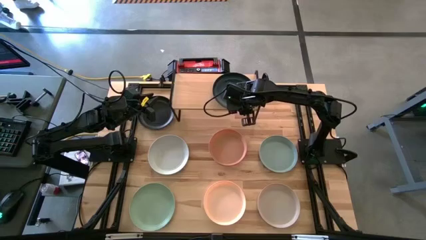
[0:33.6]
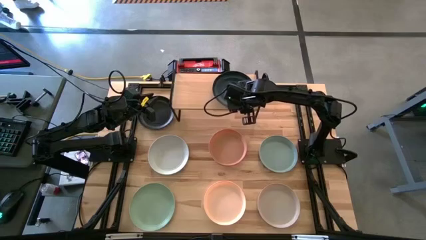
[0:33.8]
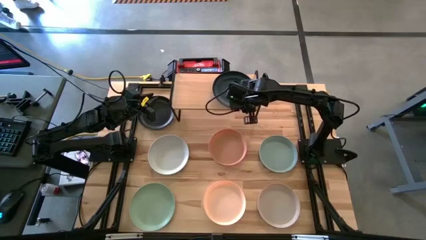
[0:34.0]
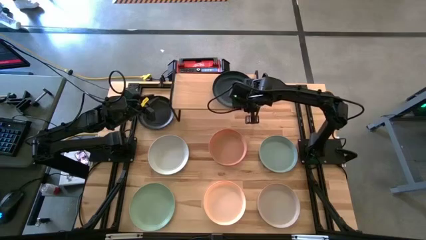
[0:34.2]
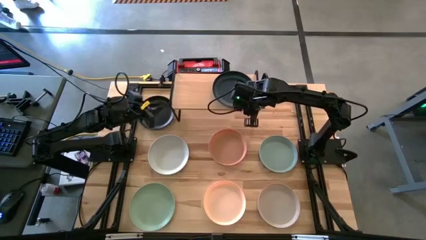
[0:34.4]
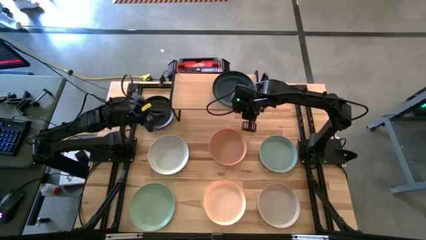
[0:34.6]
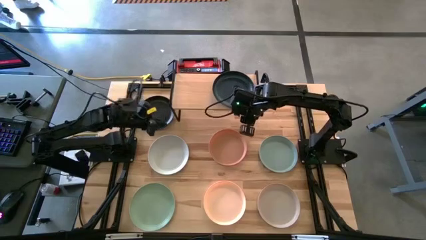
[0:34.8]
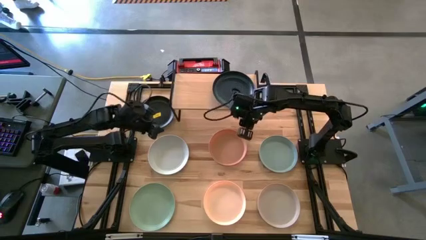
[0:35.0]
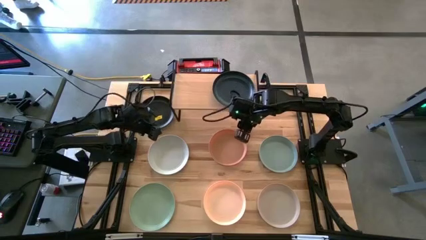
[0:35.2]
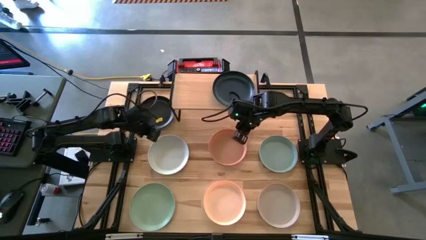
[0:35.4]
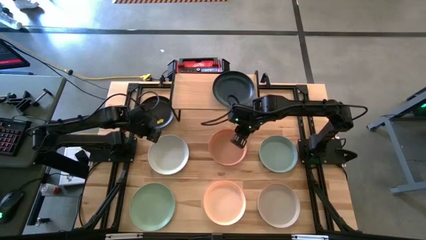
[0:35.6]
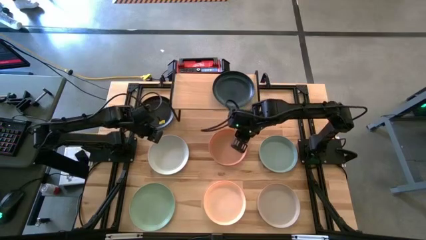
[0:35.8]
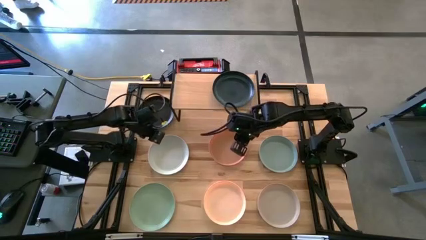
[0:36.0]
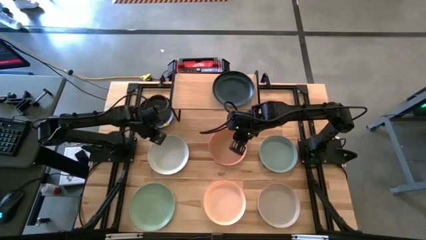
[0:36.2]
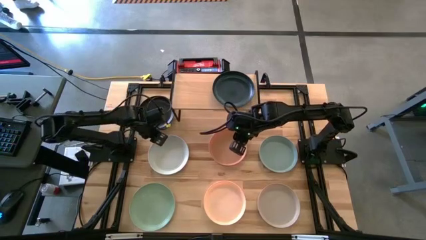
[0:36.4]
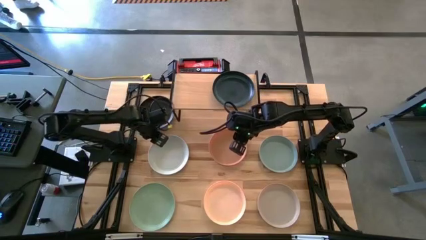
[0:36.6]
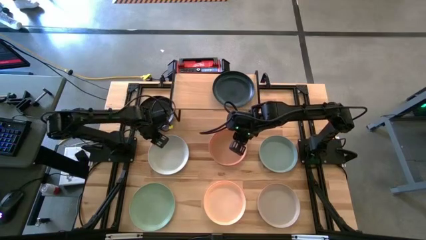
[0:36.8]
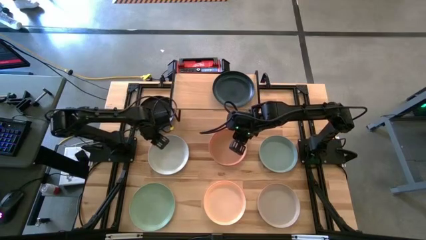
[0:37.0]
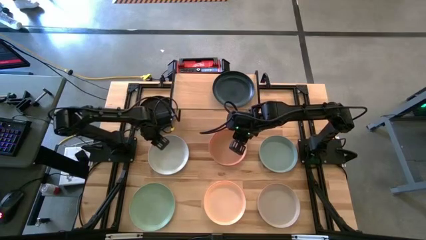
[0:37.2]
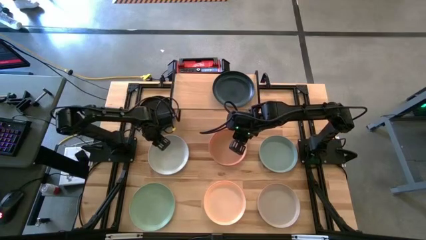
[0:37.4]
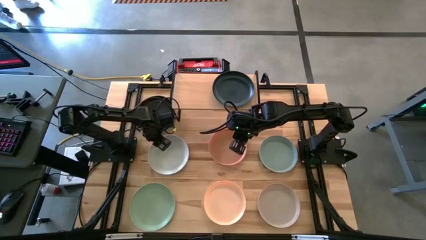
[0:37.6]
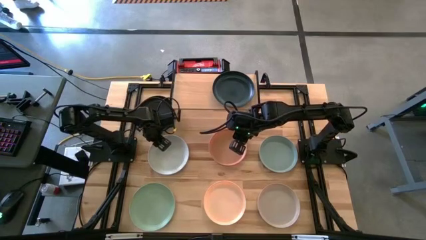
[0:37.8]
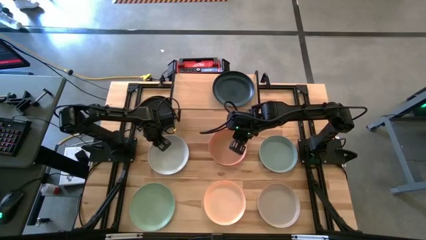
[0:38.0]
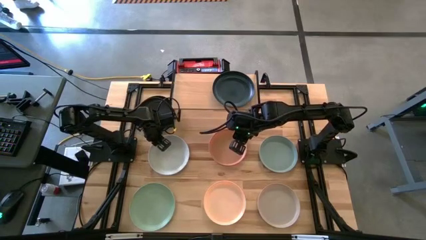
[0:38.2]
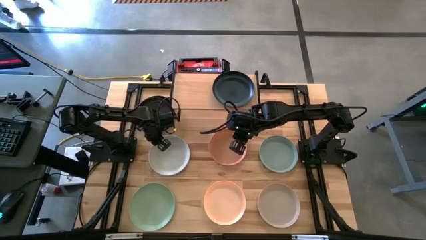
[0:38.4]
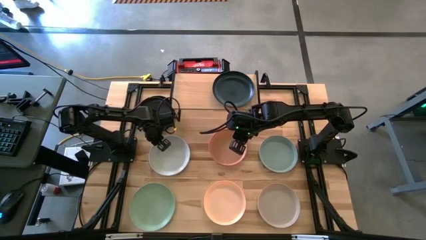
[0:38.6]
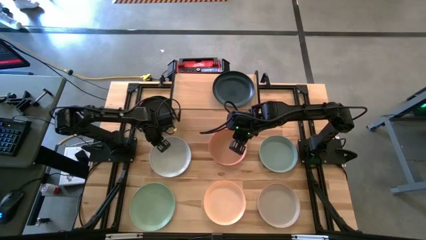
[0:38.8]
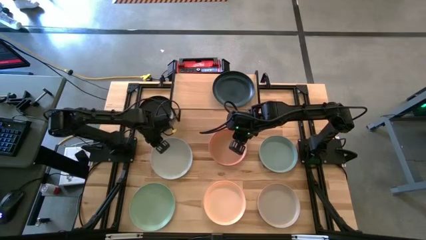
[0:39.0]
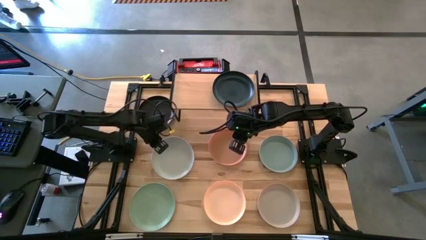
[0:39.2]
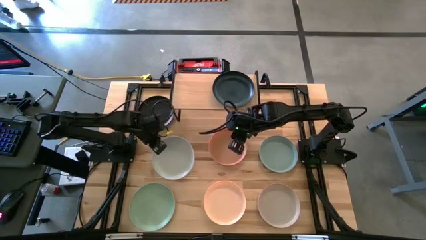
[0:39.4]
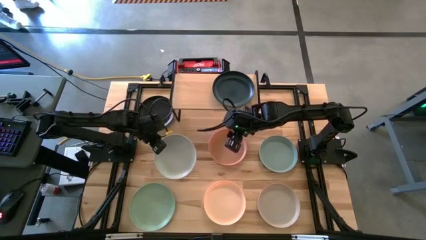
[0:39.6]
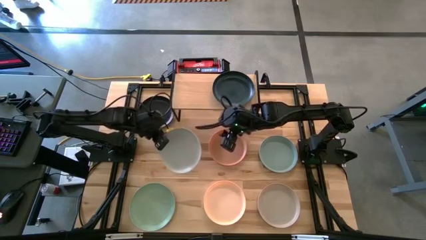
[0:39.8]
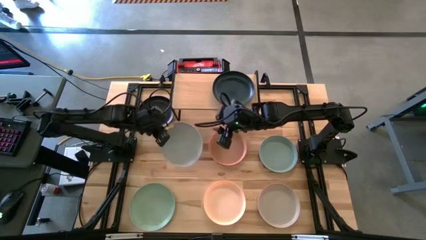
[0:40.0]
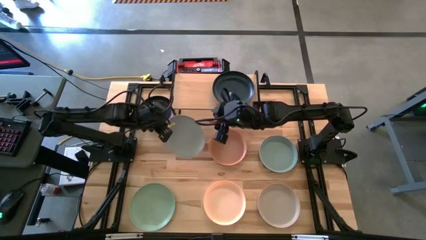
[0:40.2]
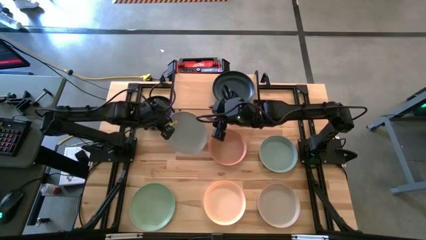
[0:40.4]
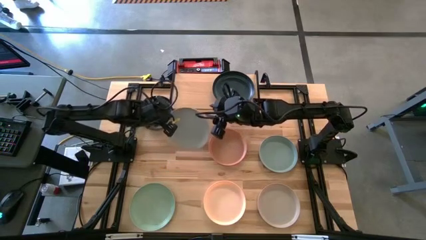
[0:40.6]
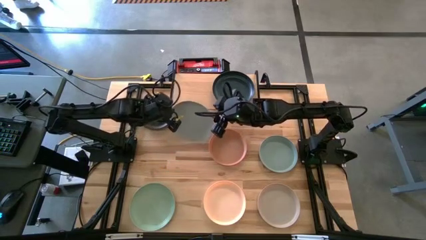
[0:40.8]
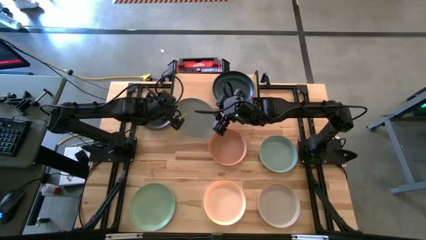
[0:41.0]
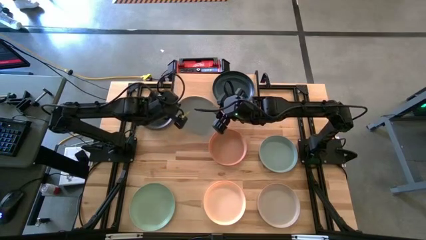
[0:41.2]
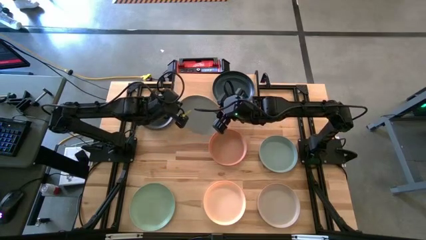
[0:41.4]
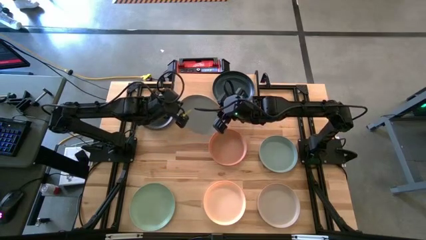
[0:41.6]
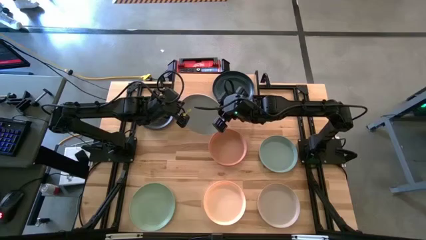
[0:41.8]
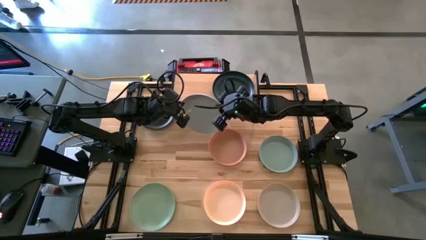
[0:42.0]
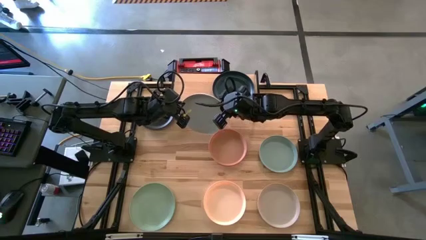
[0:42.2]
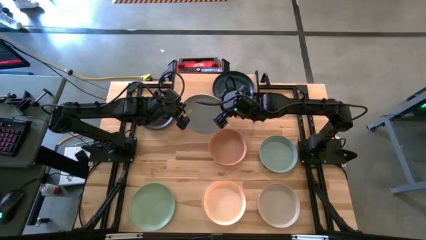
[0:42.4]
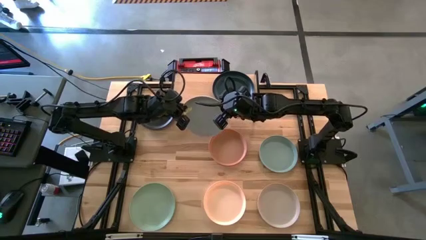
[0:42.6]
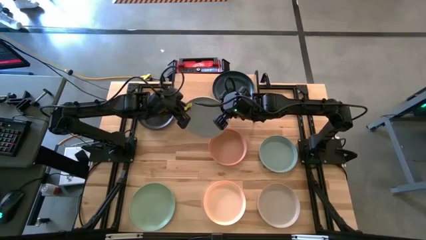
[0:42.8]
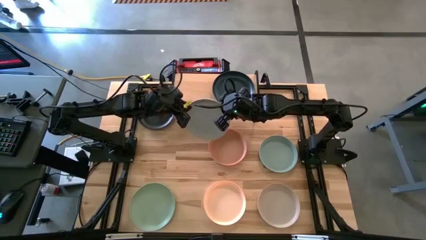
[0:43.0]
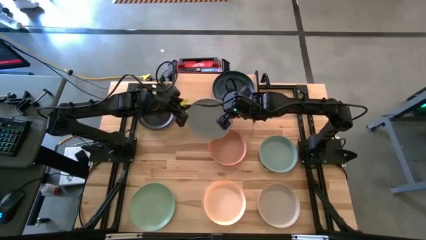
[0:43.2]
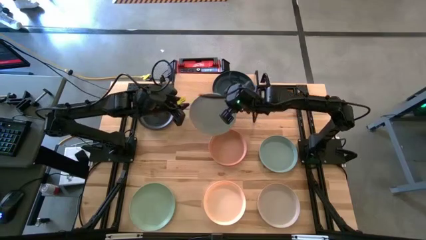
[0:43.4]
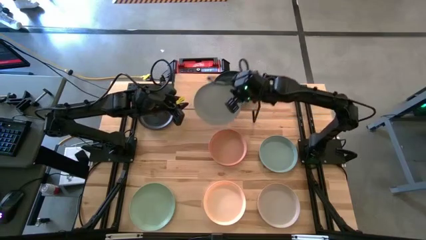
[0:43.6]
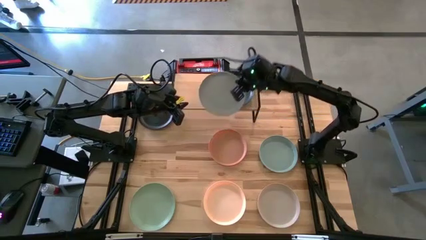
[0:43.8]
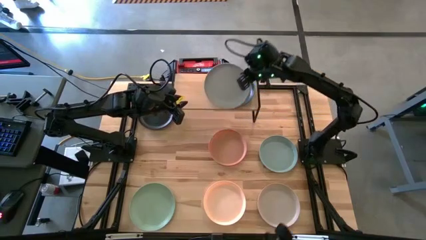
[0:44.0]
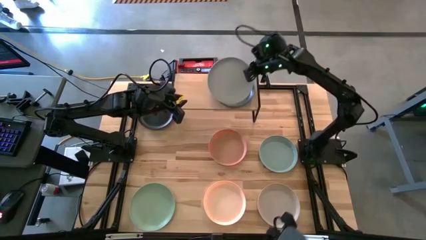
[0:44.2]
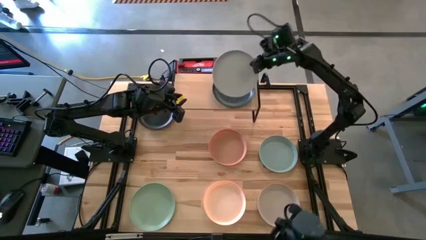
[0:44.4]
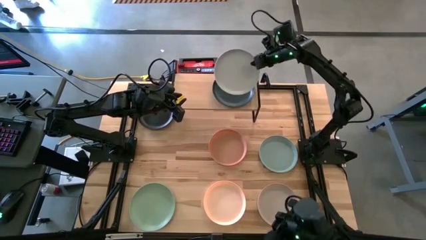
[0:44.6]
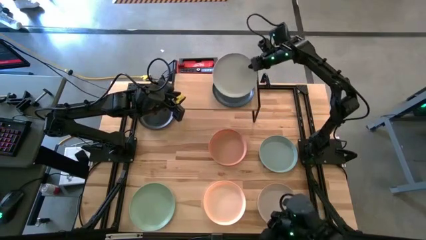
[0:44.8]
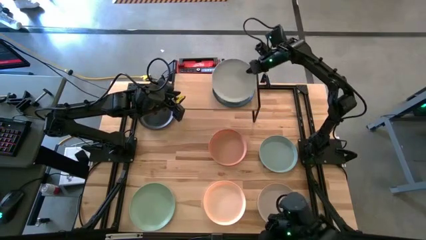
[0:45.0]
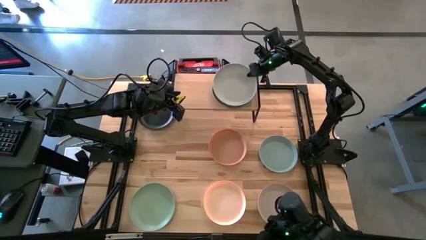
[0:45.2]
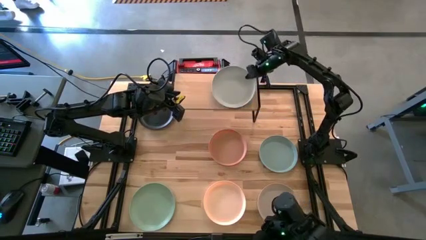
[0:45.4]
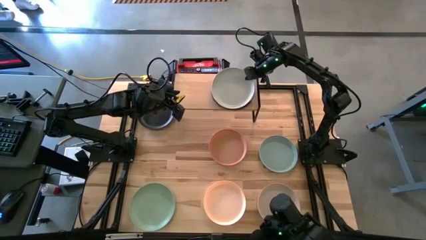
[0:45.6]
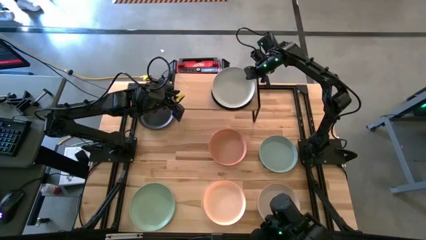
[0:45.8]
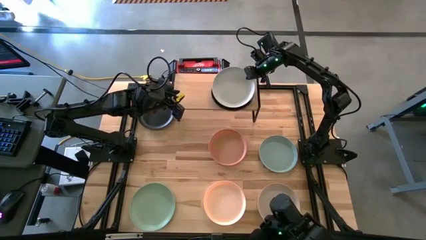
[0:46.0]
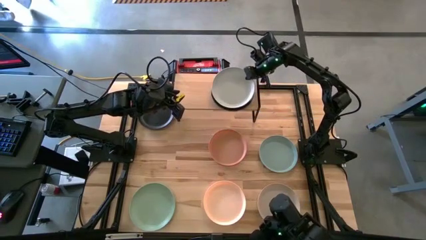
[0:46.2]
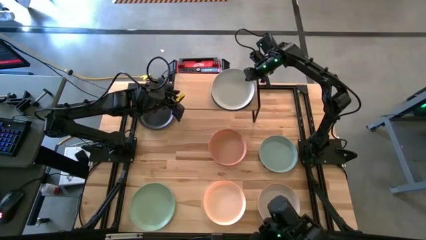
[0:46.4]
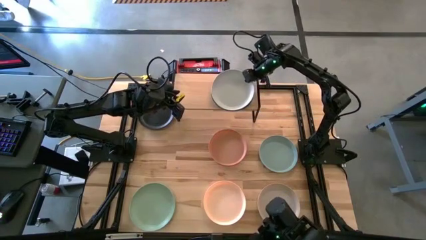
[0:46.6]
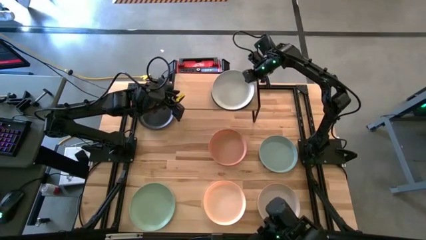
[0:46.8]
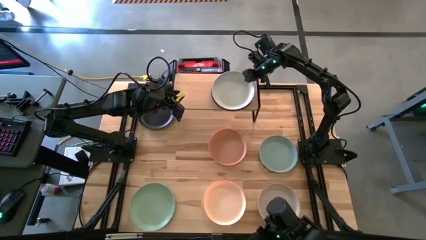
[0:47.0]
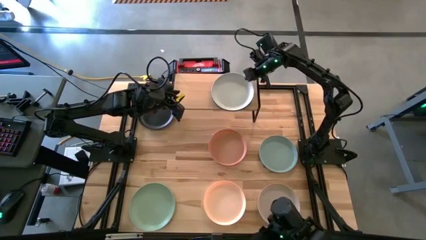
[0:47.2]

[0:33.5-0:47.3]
Task: Place and stack plates onto a shelf
Stack the top white plate on the top of the black plate on the shelf
